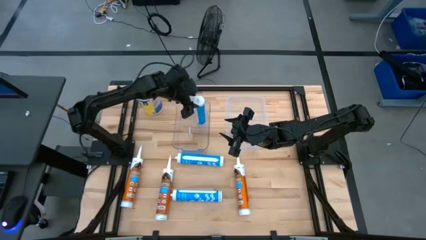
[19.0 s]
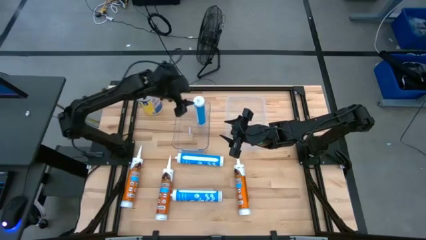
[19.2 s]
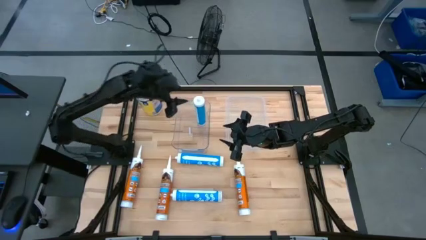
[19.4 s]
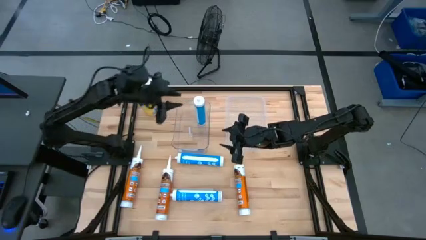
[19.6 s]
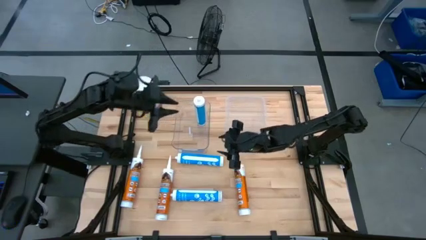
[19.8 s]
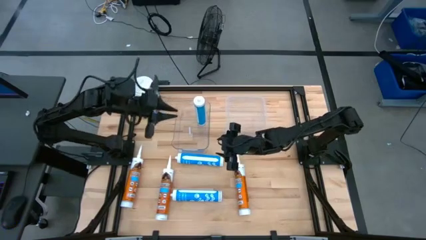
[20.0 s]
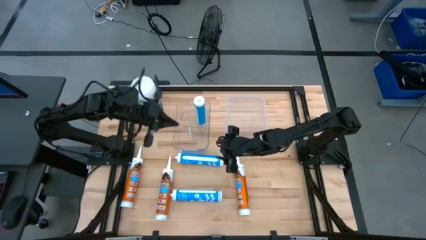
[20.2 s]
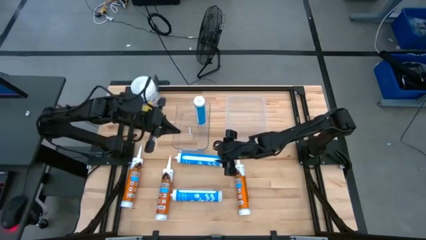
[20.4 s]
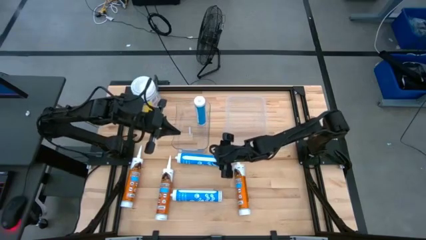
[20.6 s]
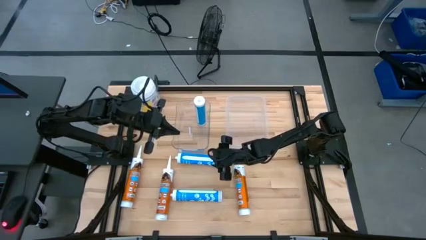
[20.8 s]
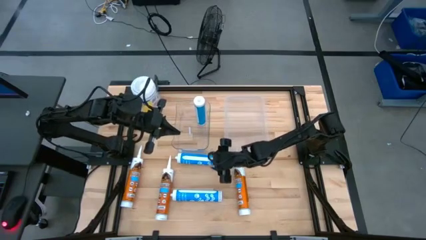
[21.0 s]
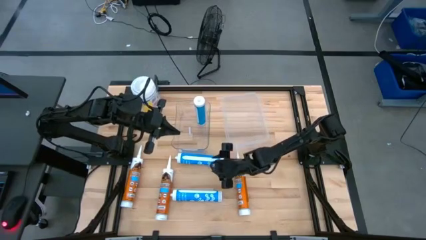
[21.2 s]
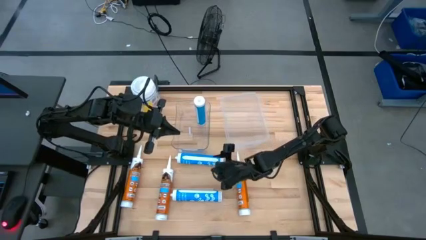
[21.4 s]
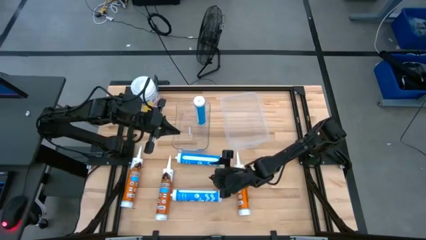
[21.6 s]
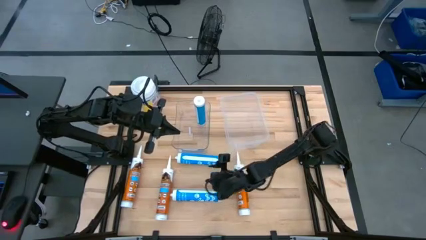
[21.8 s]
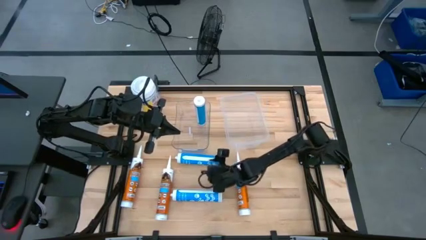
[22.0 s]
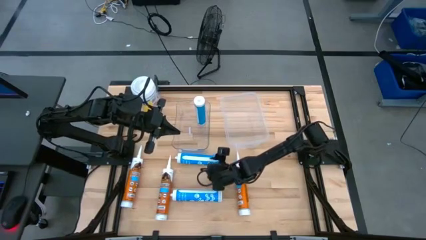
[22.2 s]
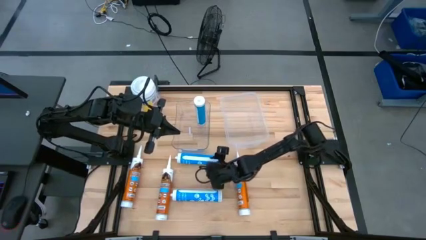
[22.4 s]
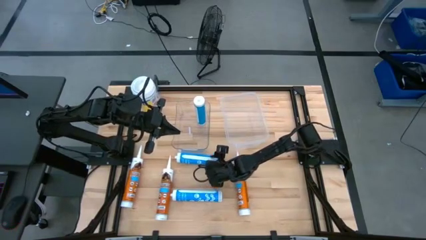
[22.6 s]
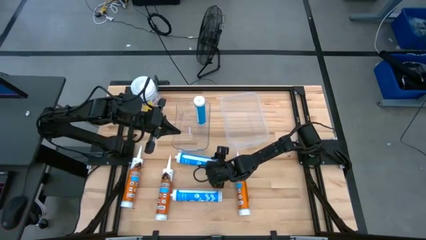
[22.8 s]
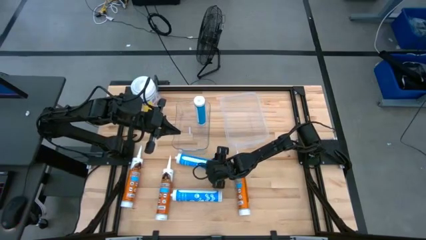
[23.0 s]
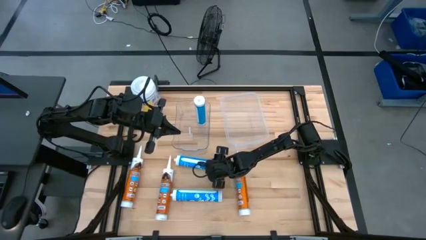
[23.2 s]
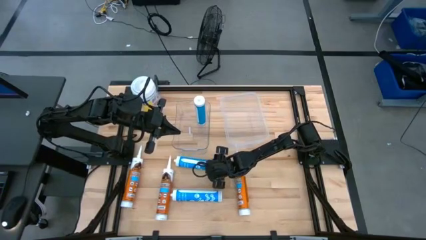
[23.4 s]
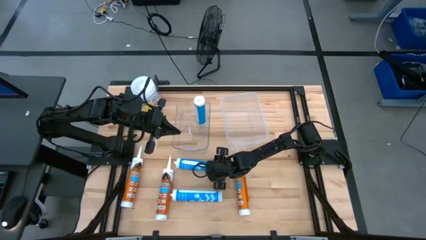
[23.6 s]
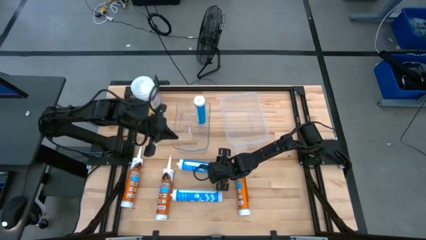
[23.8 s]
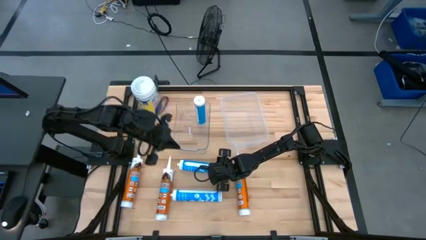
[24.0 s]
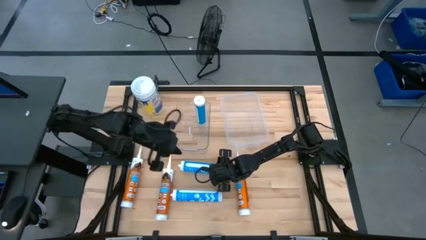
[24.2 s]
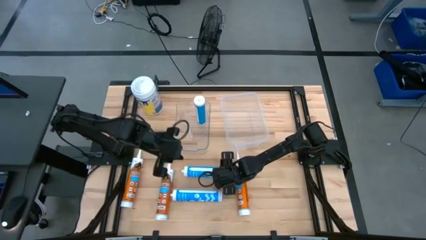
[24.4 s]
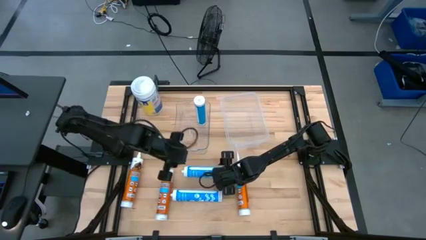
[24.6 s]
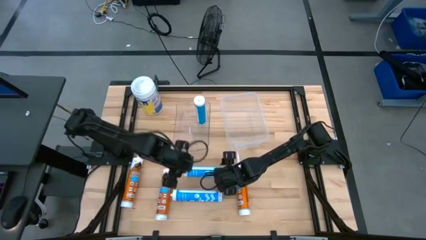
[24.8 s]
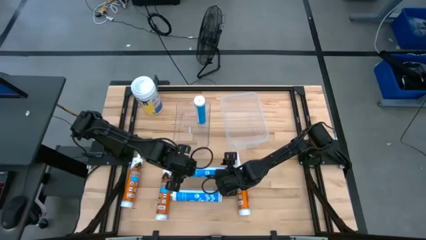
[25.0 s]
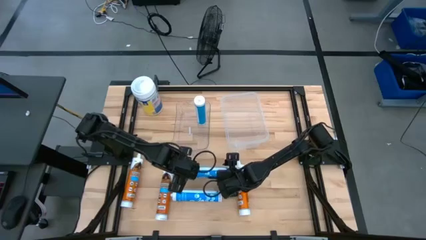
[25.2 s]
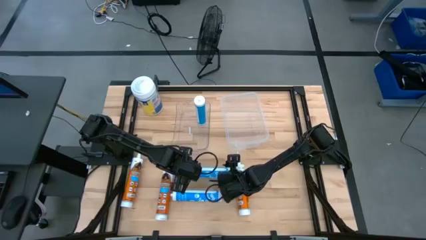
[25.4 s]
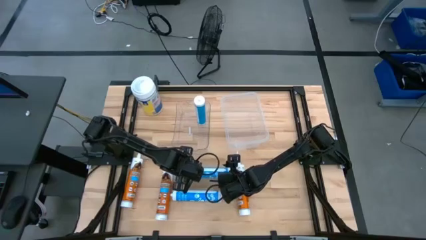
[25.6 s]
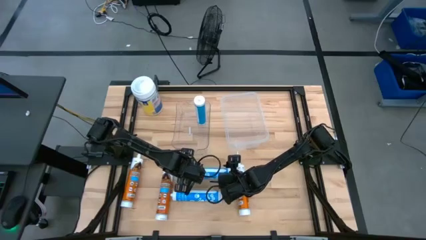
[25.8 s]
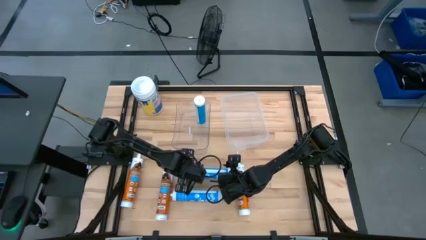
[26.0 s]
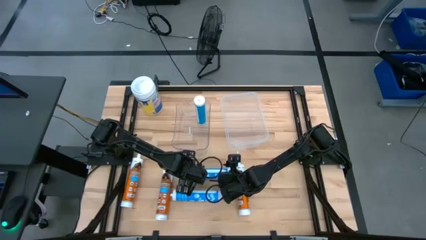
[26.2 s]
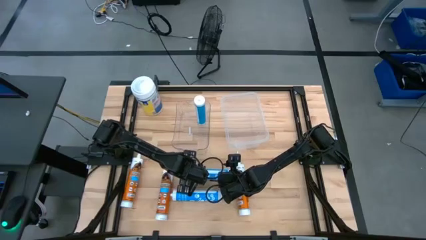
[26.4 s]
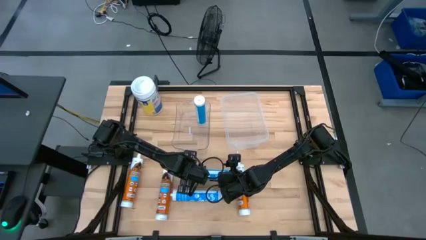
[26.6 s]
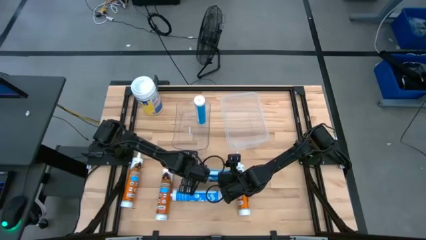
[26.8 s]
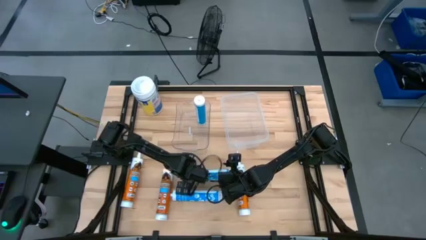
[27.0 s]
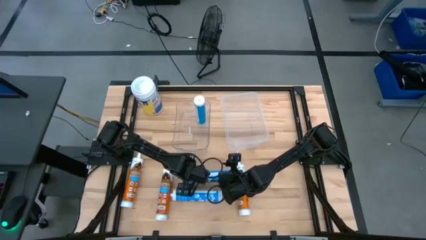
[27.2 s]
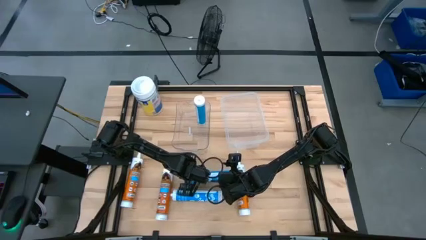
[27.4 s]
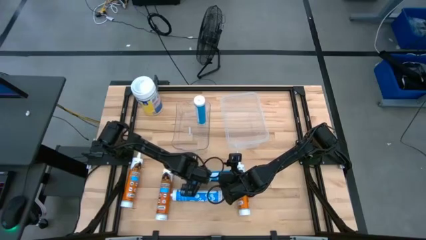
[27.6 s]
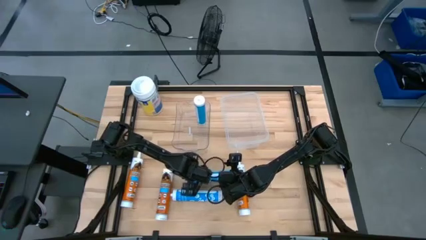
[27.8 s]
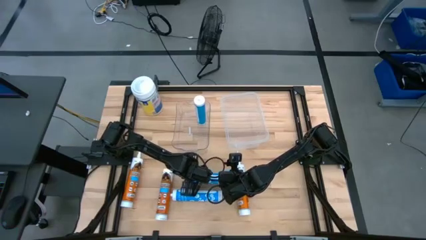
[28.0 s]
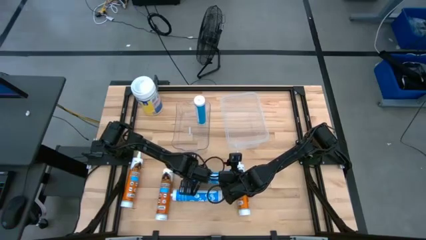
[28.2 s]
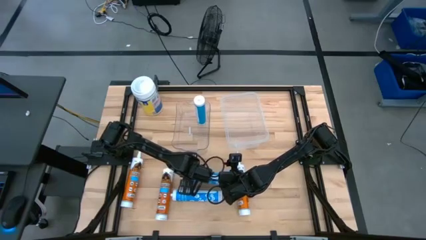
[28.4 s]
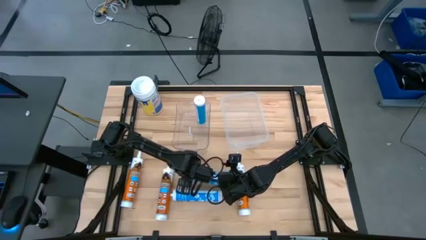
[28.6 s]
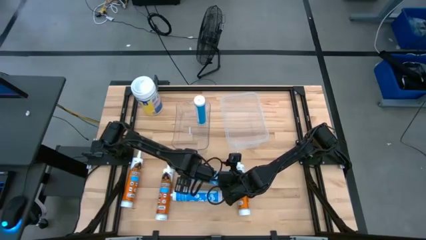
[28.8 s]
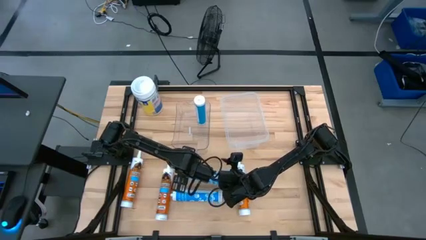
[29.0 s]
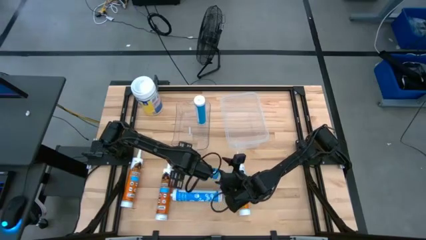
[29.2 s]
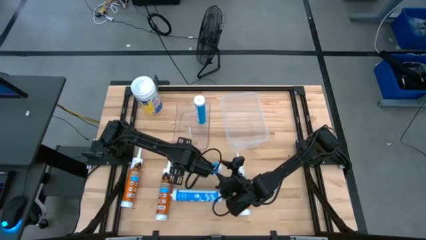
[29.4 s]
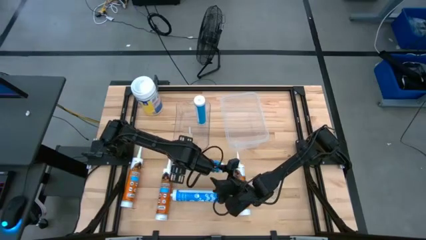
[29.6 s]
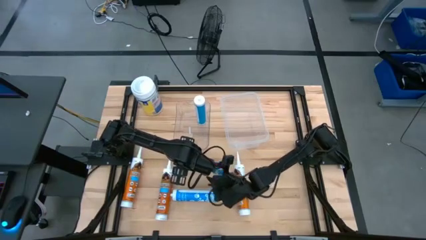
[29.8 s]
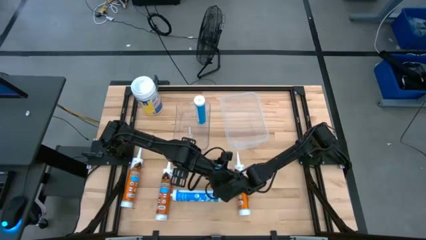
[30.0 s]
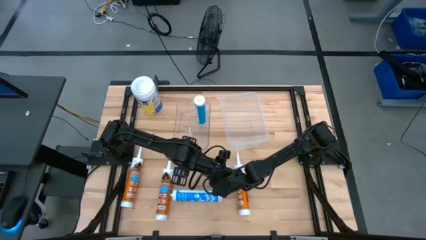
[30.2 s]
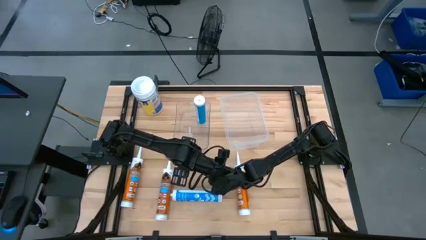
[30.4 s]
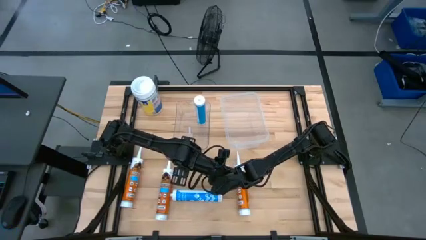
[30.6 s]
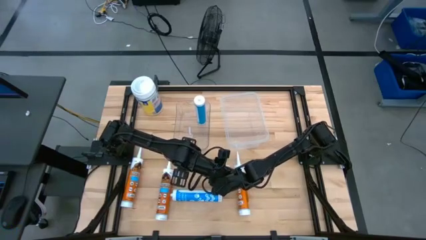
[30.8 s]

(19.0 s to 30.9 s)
Task: Pick & place silicon tubes, Sealant and Lysol wipes
Put the top blue sealant into the left transparent bin
